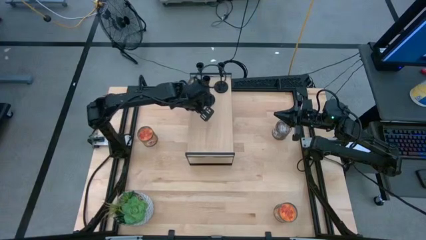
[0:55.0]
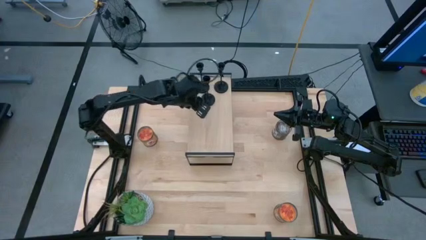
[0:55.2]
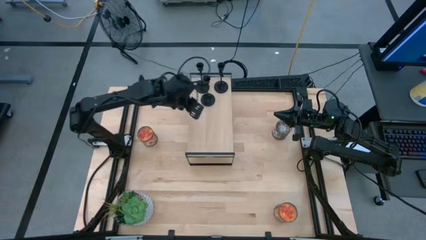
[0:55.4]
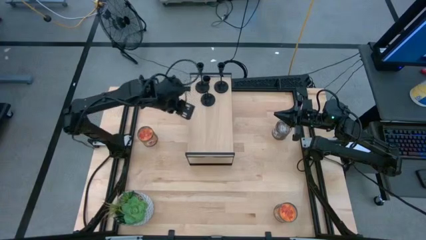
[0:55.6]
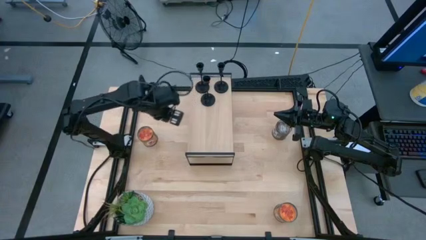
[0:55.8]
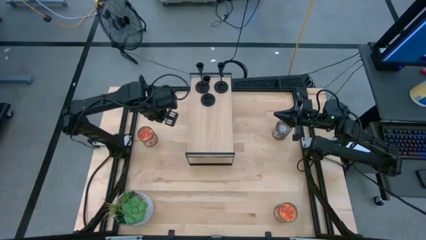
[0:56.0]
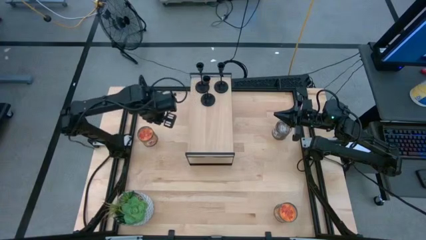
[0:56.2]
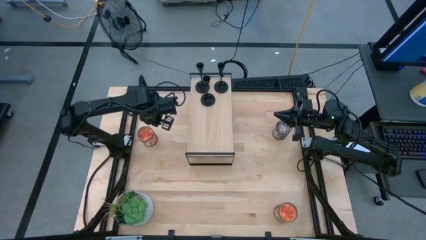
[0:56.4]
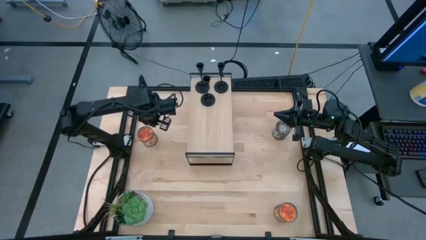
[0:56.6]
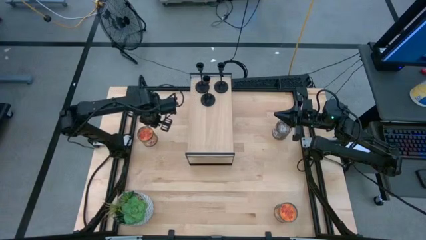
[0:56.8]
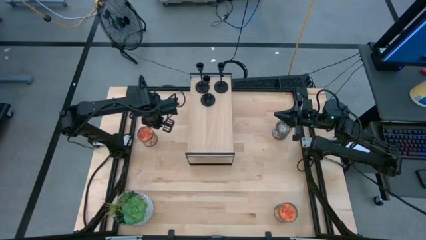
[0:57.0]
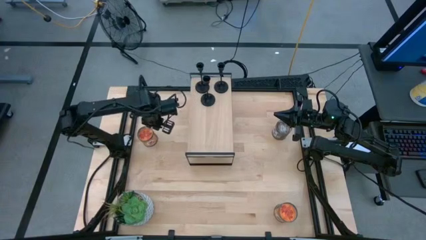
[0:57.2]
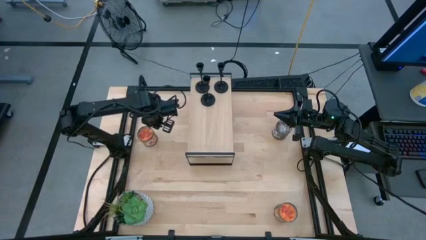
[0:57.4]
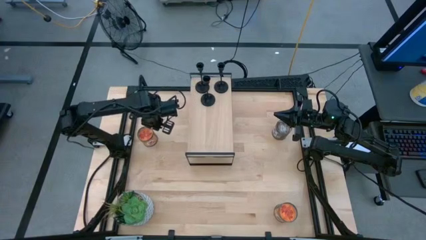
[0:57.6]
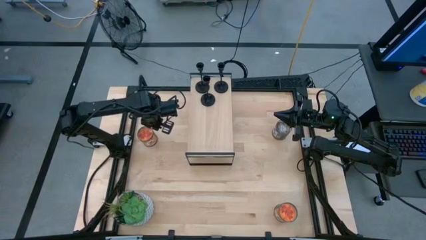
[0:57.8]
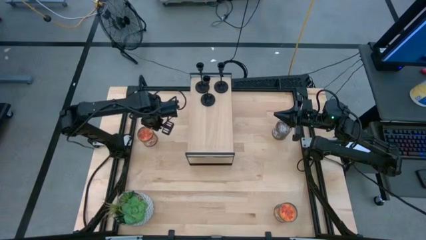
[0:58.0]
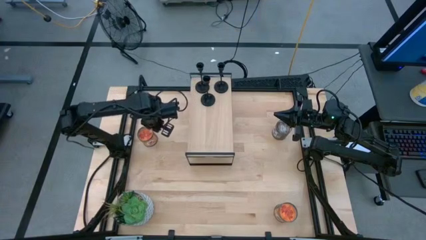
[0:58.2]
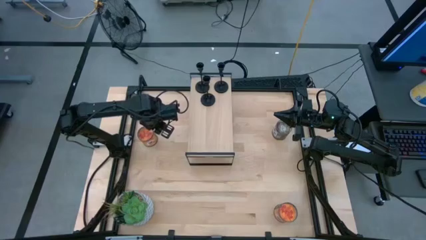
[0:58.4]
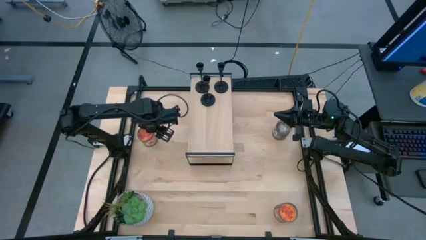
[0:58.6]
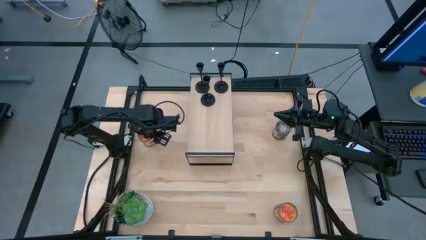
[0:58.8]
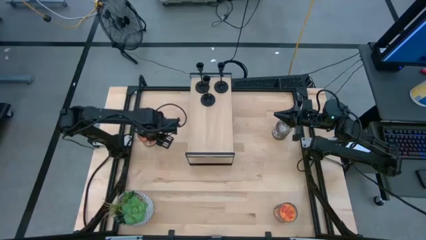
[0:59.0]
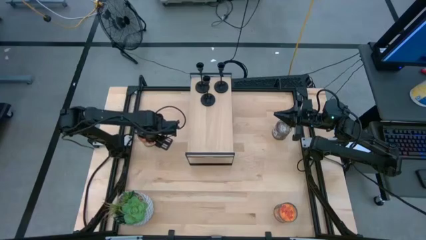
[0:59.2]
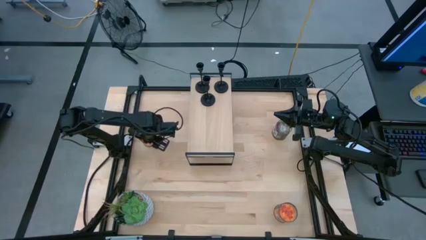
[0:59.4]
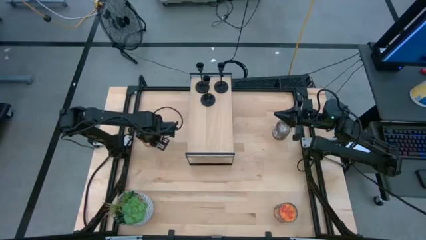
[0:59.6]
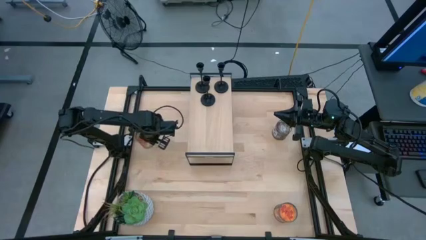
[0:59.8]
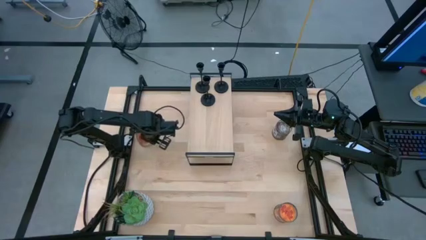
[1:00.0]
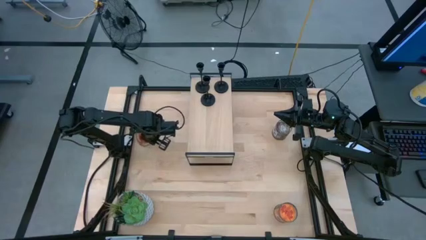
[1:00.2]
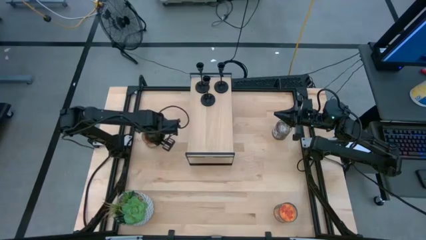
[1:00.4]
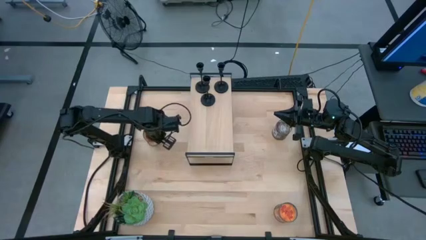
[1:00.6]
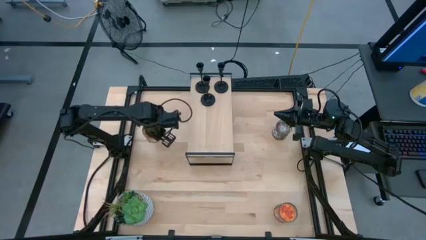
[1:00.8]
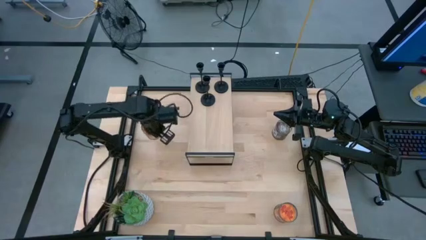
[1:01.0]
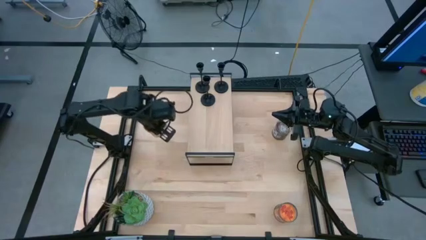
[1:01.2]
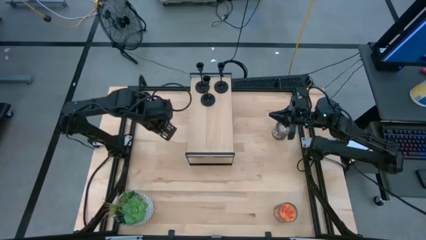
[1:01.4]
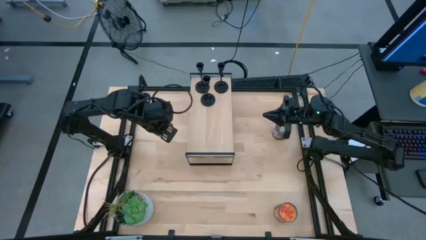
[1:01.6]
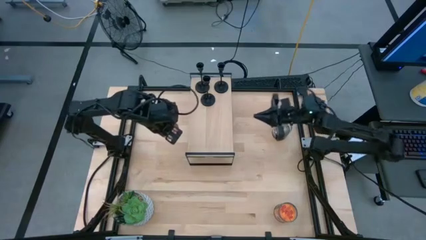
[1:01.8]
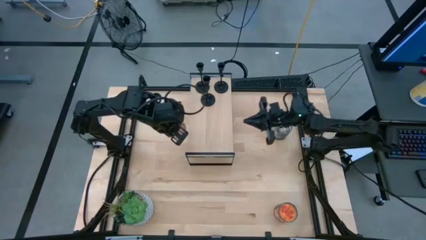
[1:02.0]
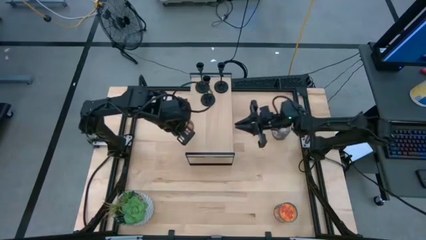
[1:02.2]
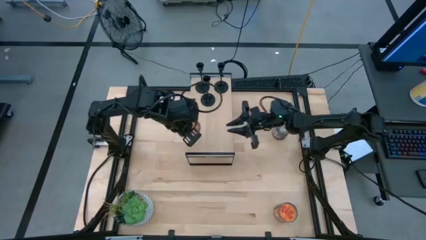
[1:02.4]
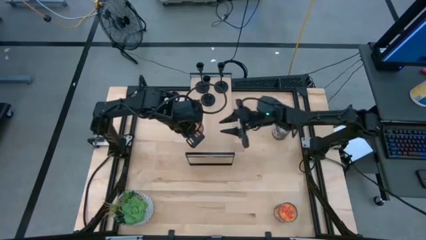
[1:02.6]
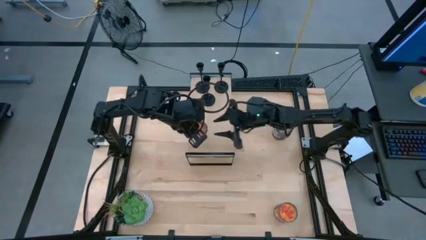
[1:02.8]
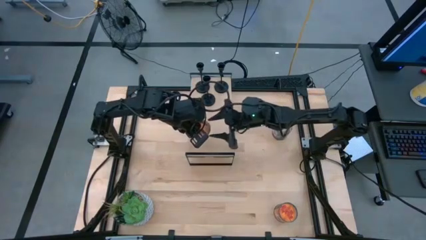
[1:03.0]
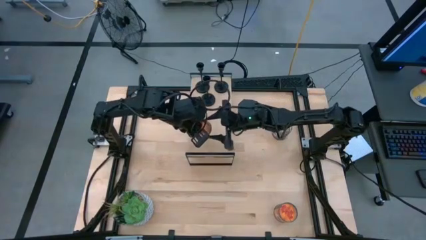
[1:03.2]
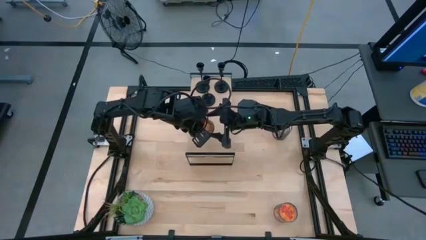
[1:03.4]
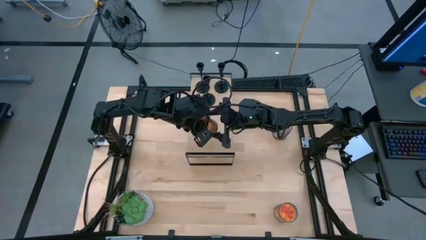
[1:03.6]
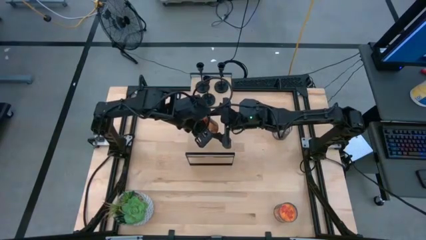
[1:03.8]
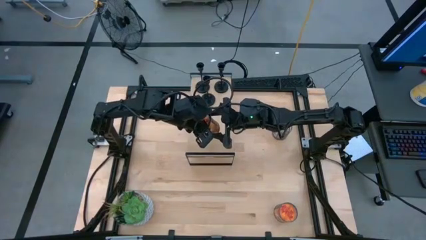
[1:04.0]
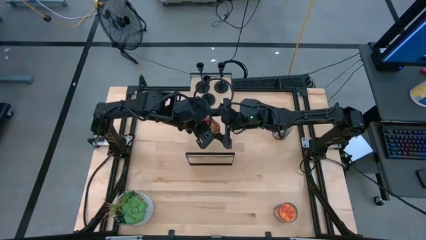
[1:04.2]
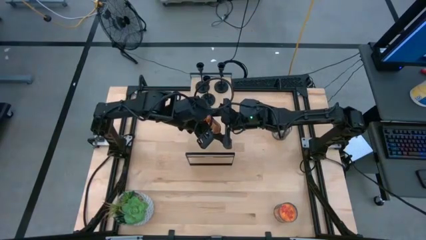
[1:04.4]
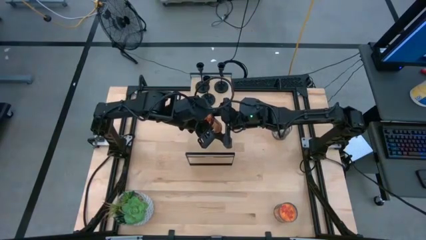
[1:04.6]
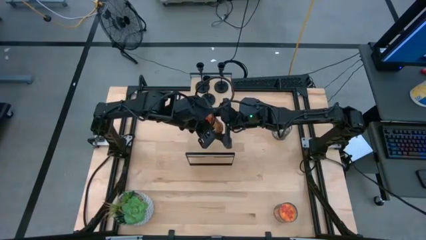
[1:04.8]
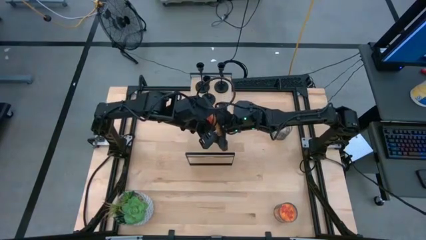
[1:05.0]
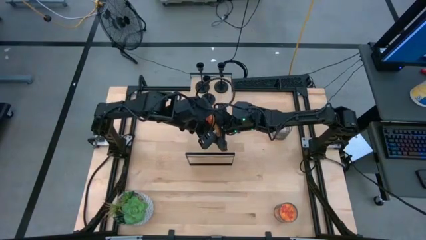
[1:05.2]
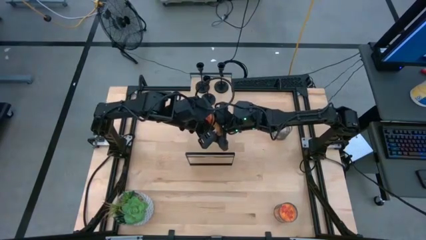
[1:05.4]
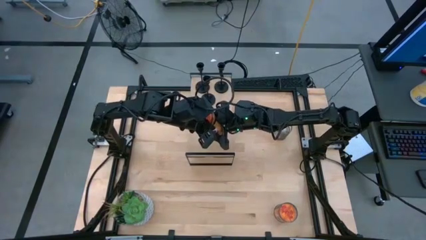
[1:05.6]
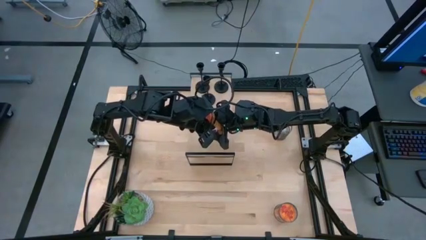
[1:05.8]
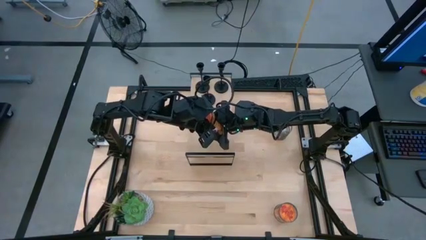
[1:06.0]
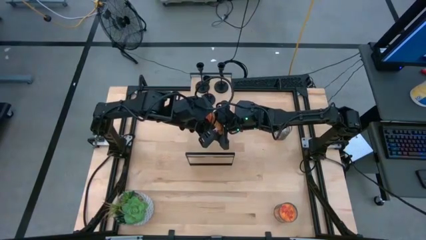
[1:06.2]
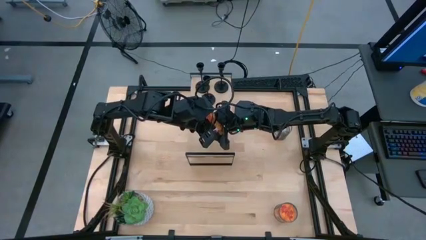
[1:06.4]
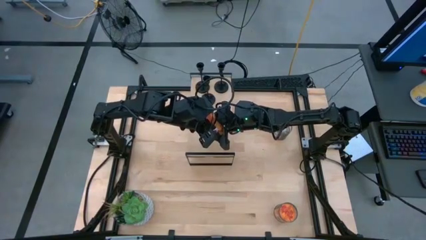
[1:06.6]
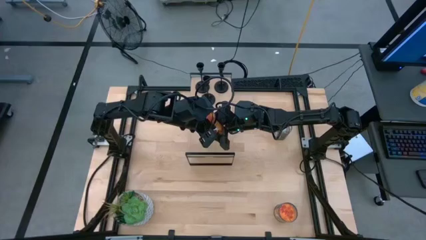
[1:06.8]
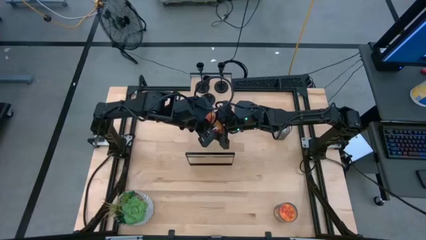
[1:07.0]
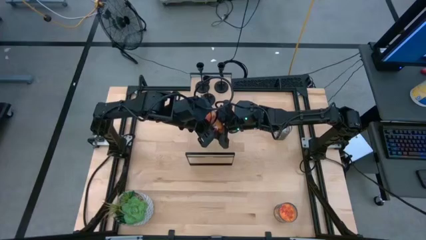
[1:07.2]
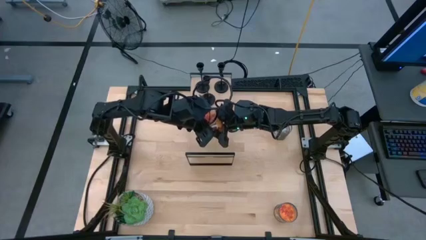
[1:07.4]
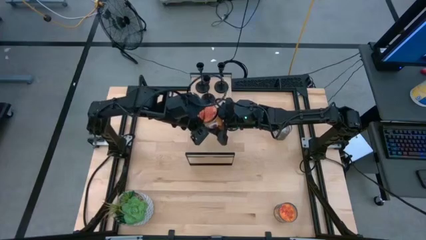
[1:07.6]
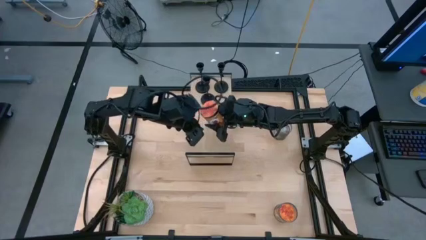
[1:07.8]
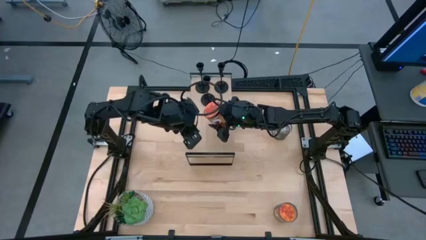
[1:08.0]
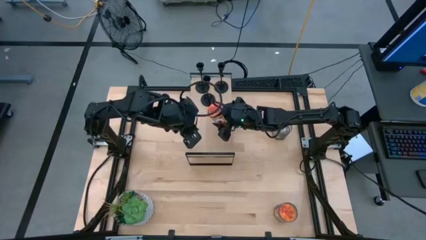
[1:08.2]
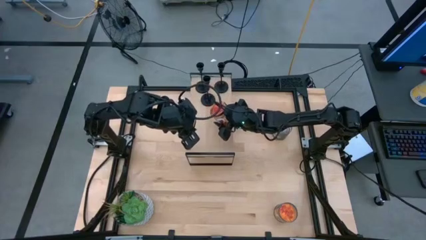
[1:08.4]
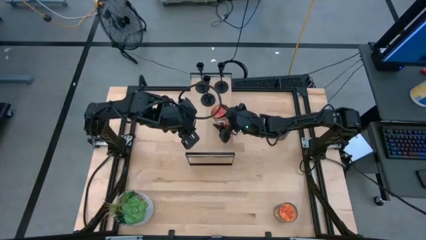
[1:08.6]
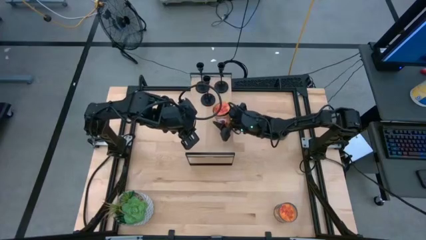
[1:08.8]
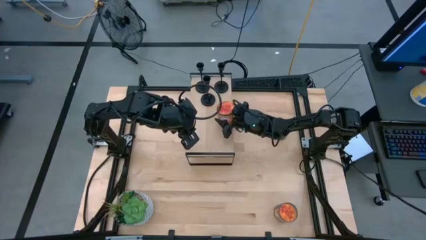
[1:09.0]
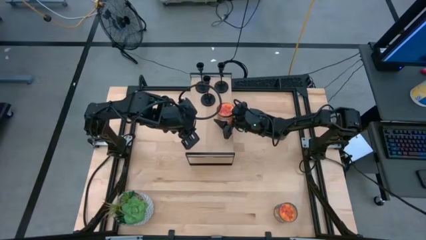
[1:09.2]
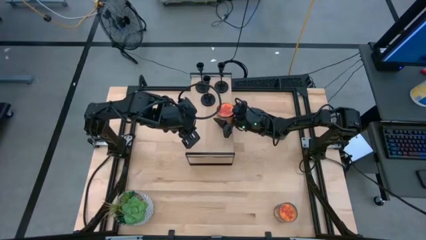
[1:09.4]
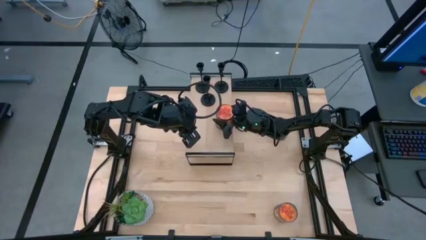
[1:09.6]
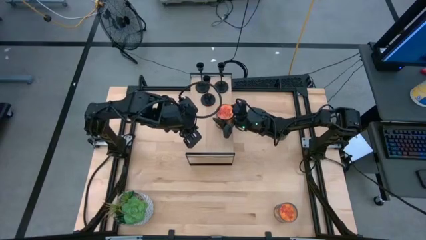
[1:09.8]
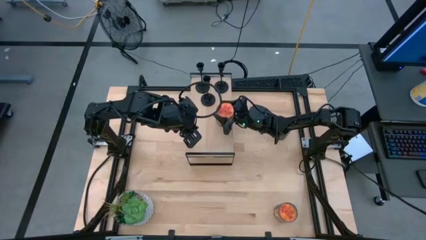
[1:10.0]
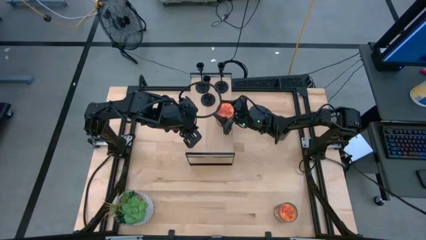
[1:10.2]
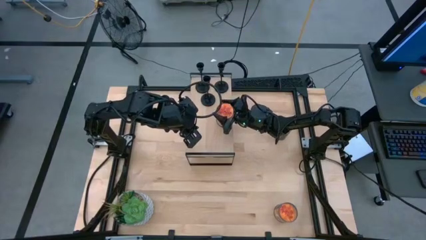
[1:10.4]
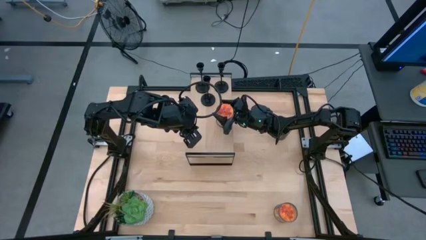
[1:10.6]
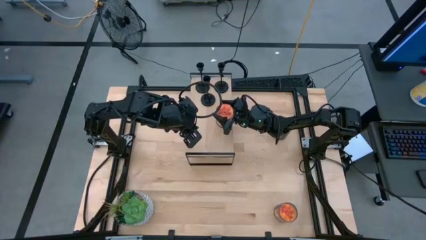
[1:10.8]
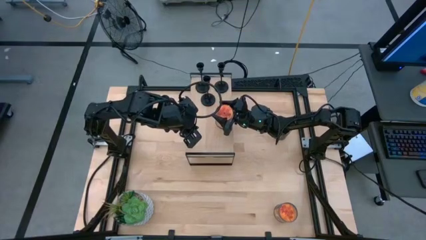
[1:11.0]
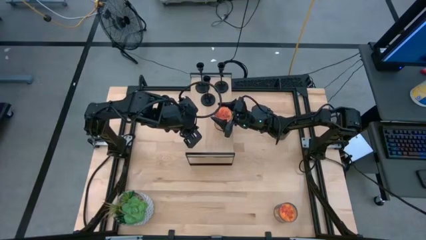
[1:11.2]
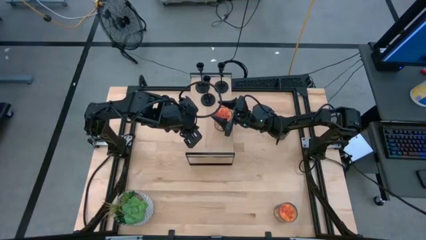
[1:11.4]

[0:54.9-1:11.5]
Task: Pick & Place candle stick holders
Put the top orange scented candle on the shelf
